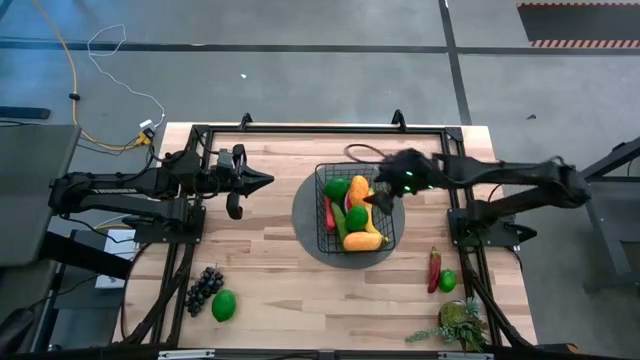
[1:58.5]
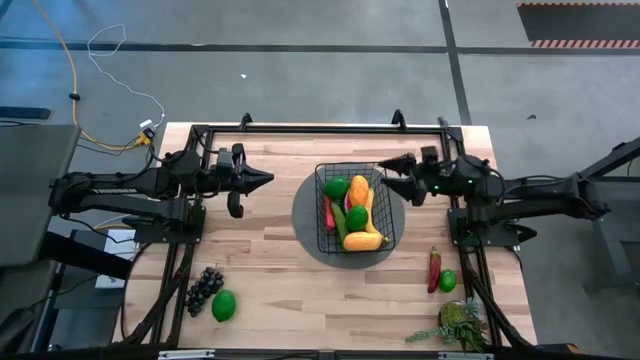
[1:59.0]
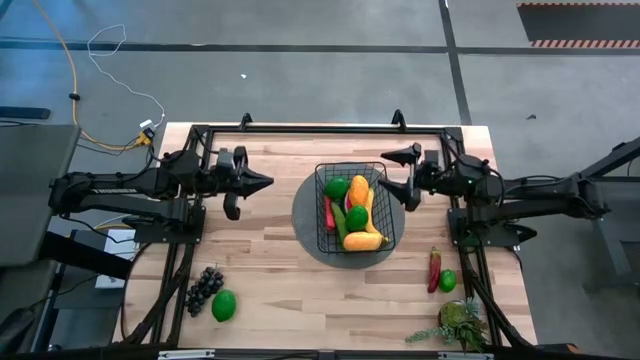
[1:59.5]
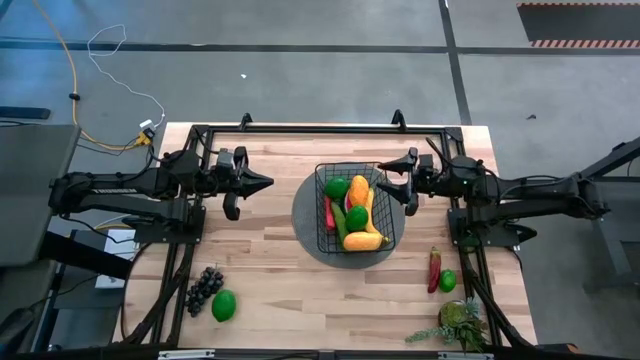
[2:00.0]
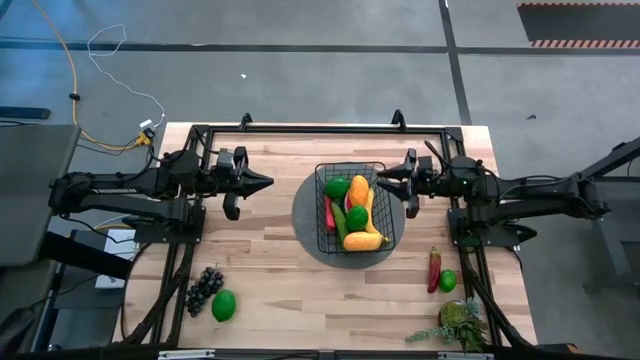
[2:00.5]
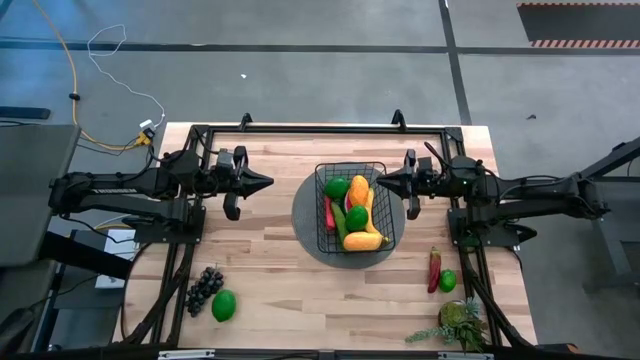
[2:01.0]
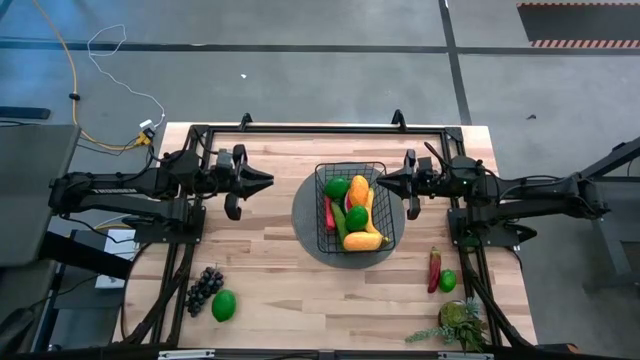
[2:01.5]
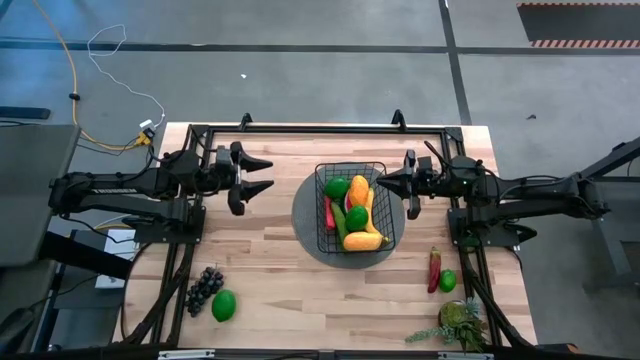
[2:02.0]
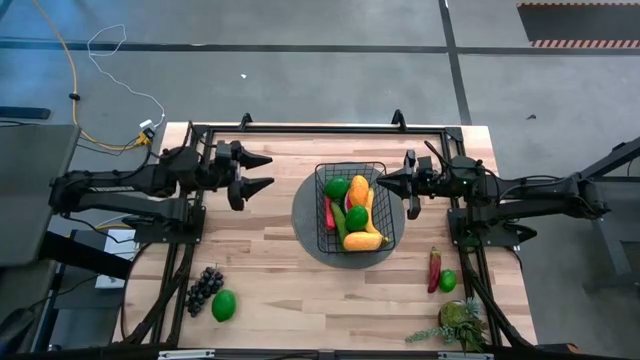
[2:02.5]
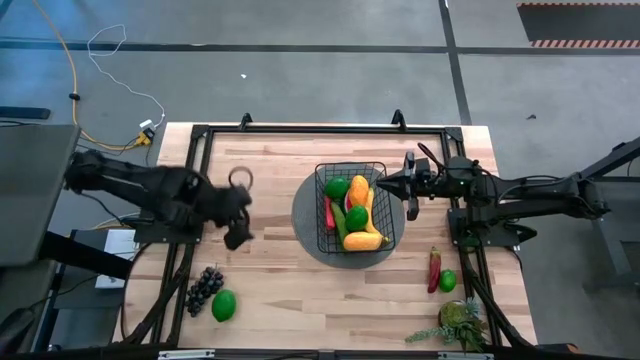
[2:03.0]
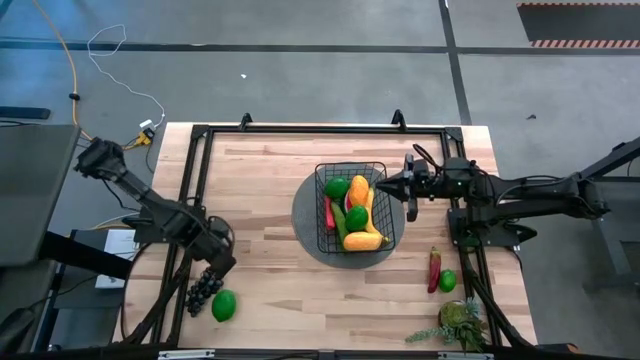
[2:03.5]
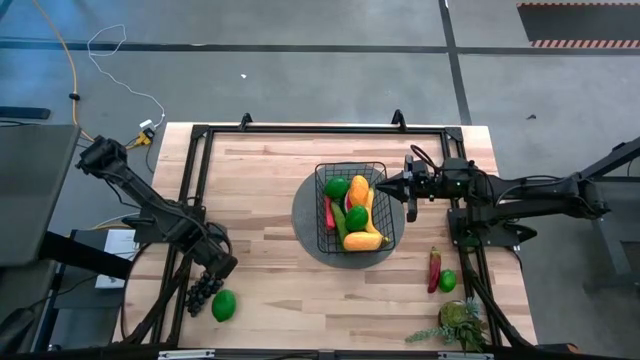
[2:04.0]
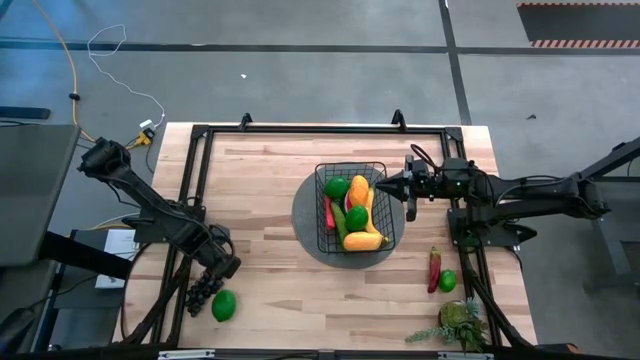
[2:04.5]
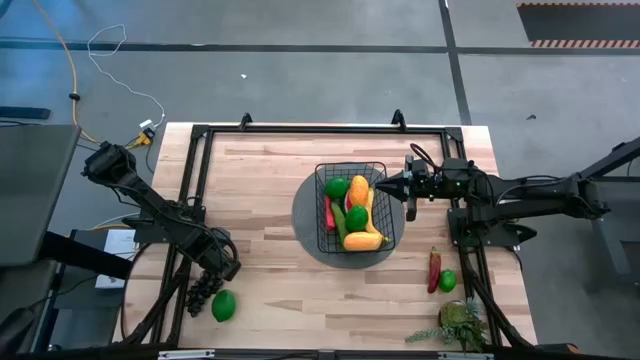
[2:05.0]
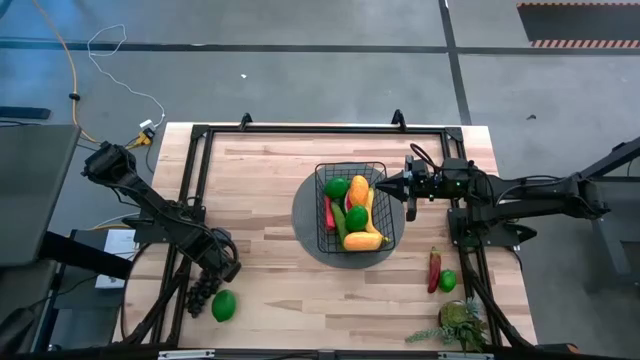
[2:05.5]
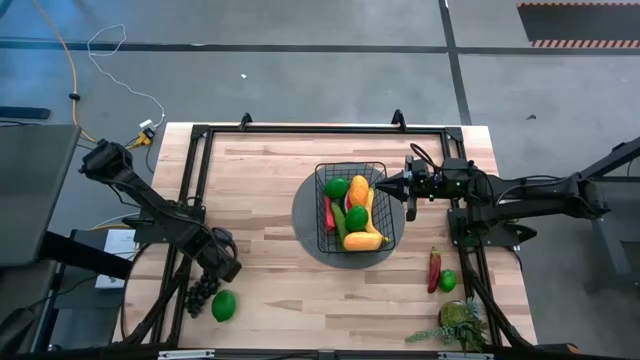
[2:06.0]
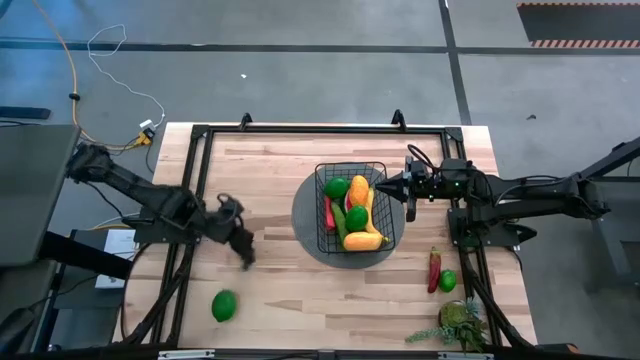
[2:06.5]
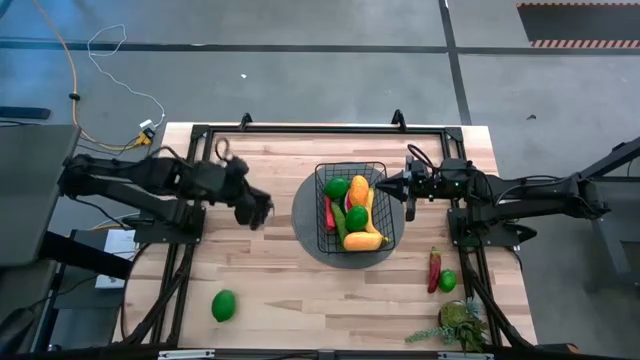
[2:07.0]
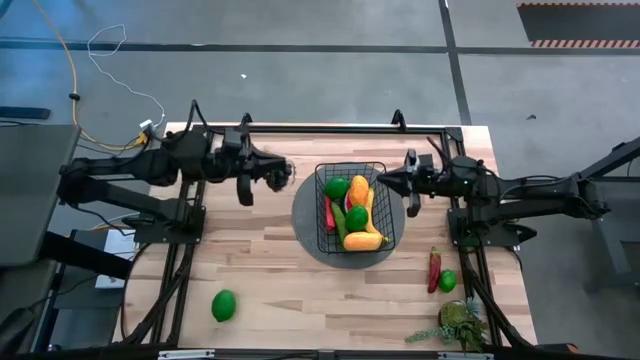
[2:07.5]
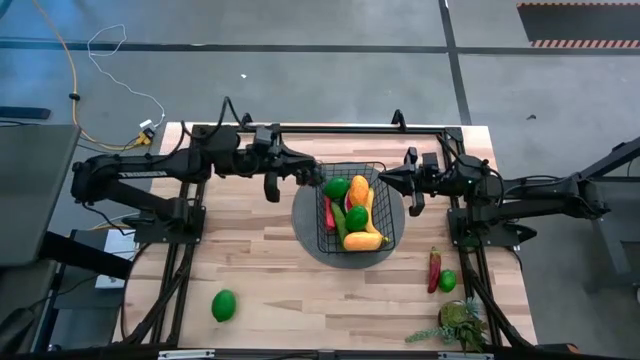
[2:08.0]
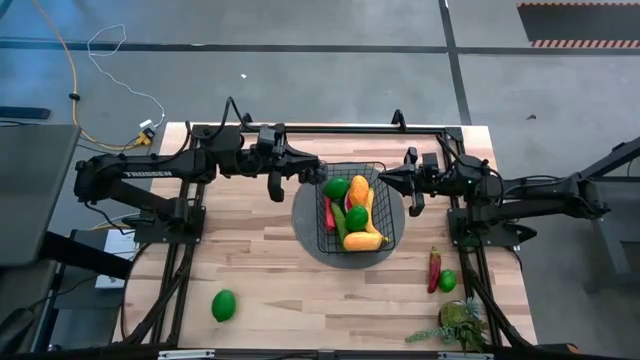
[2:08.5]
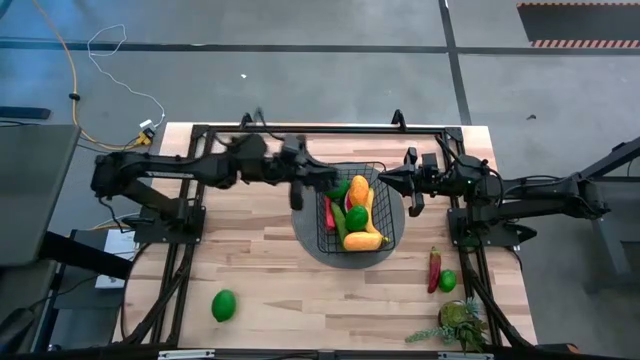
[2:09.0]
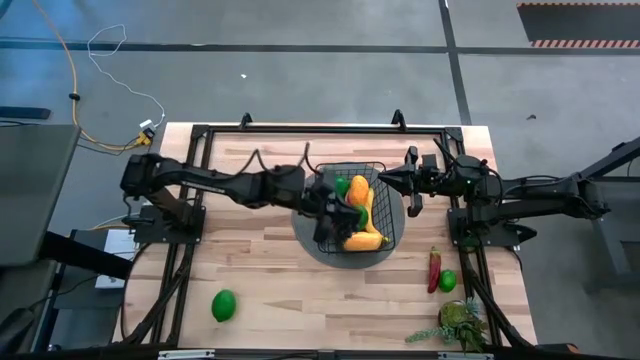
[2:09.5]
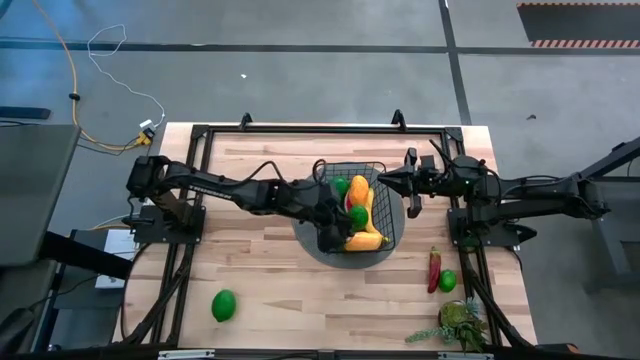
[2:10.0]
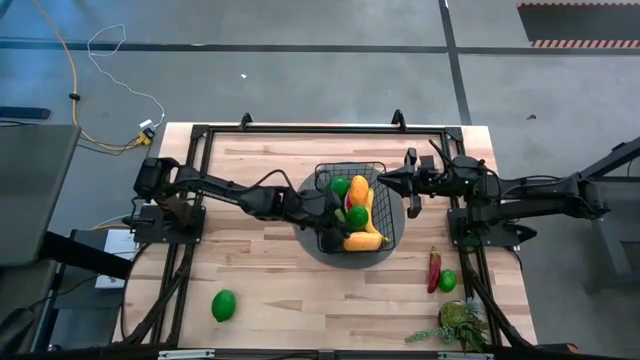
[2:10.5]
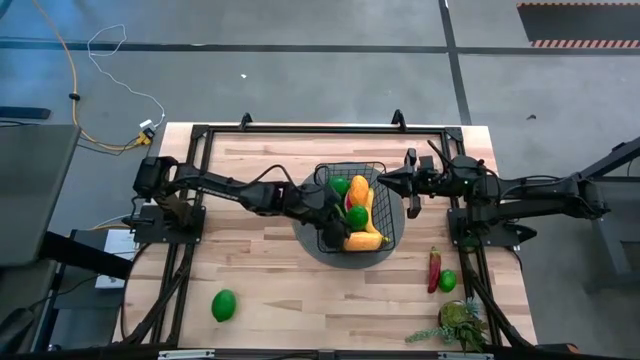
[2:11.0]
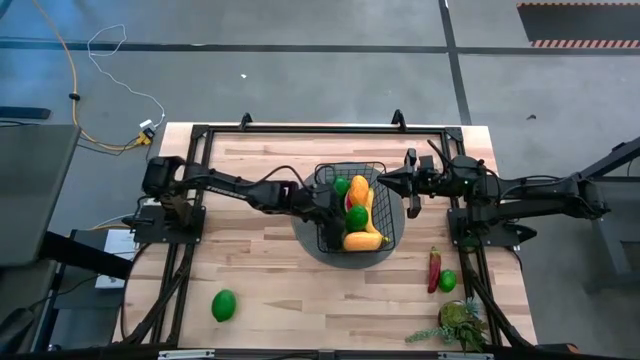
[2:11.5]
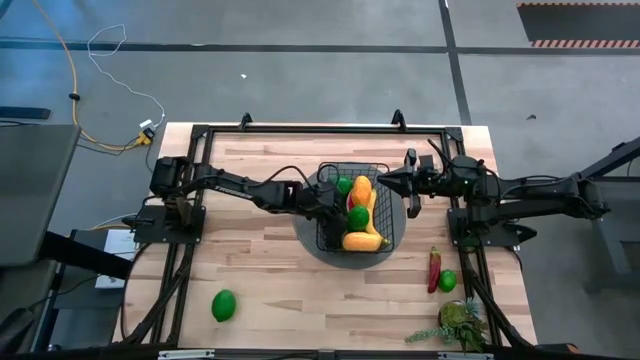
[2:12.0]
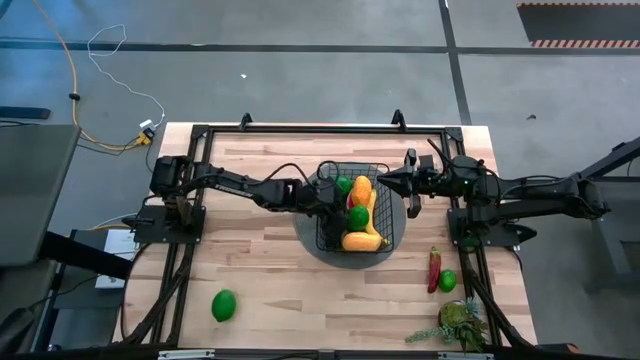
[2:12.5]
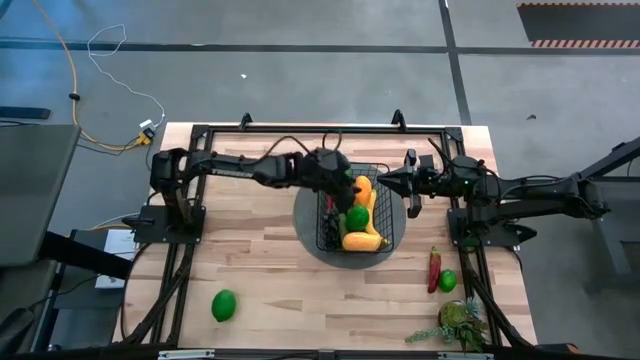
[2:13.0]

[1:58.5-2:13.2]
Task: Build produce basket
Put the black grapes into the black wire basket

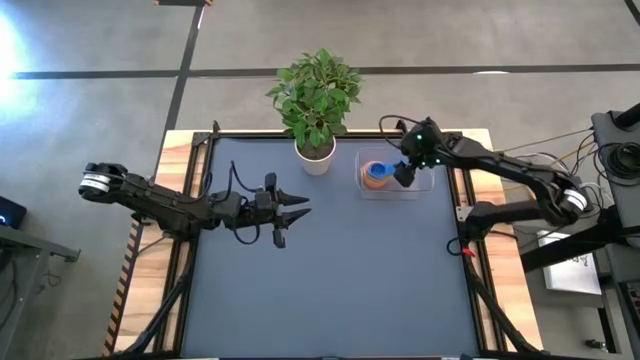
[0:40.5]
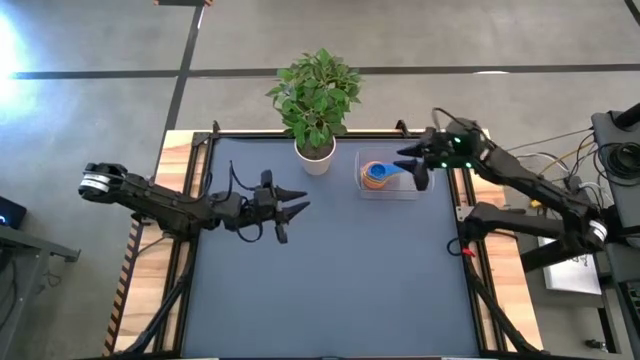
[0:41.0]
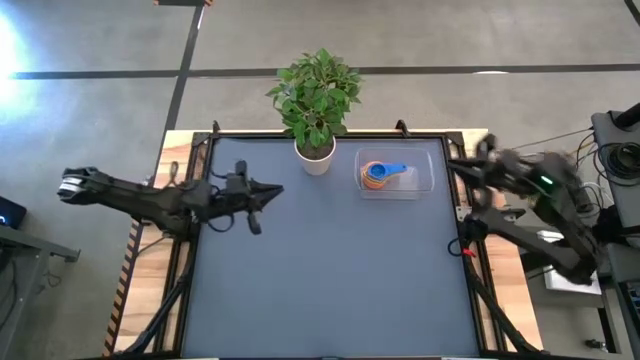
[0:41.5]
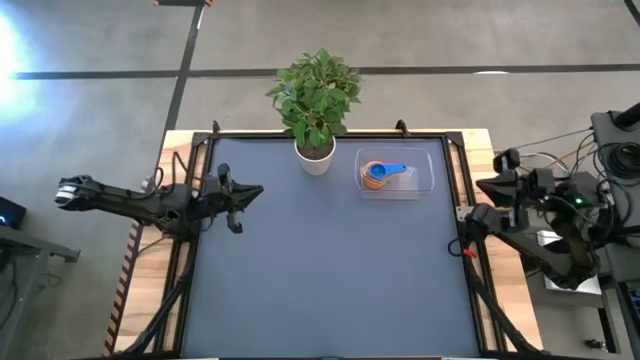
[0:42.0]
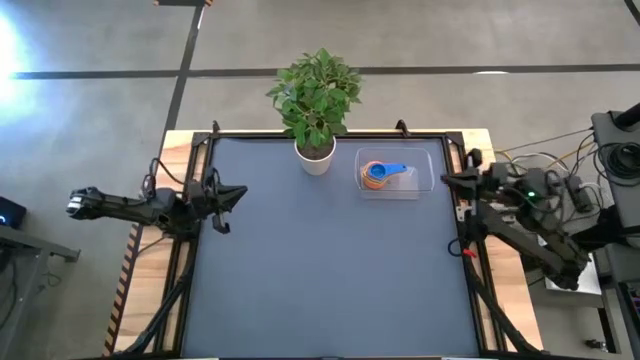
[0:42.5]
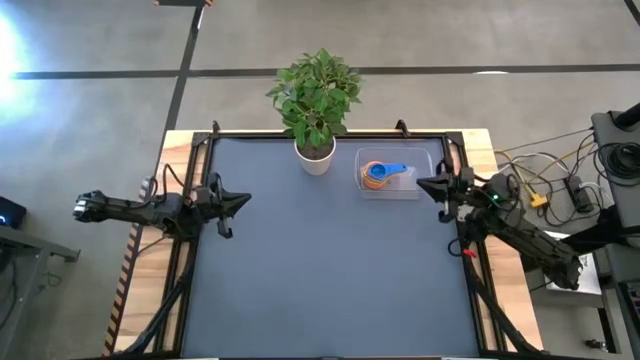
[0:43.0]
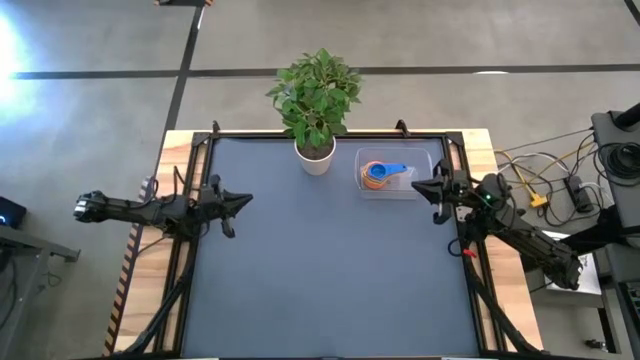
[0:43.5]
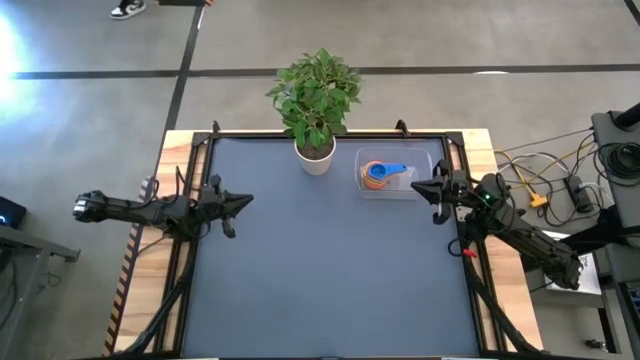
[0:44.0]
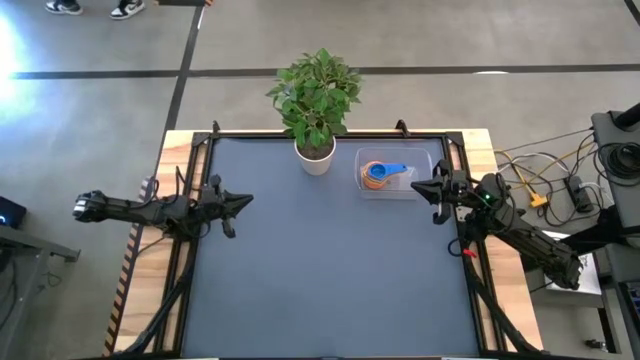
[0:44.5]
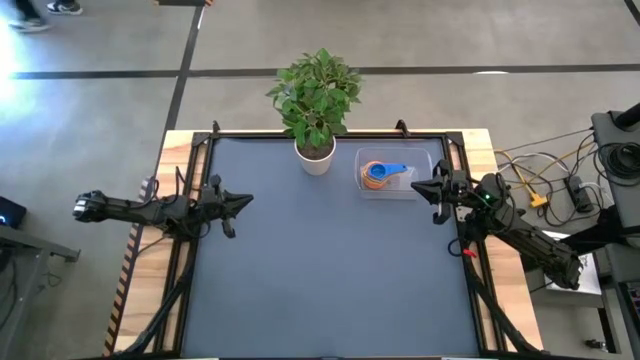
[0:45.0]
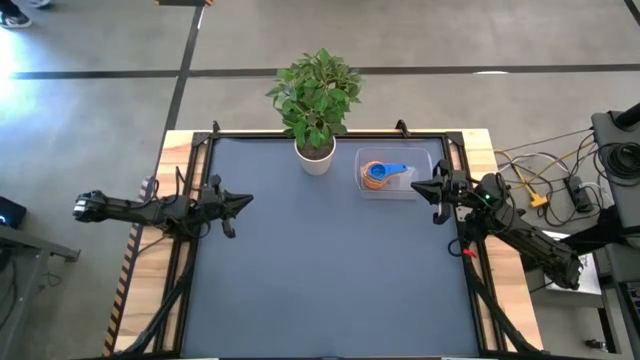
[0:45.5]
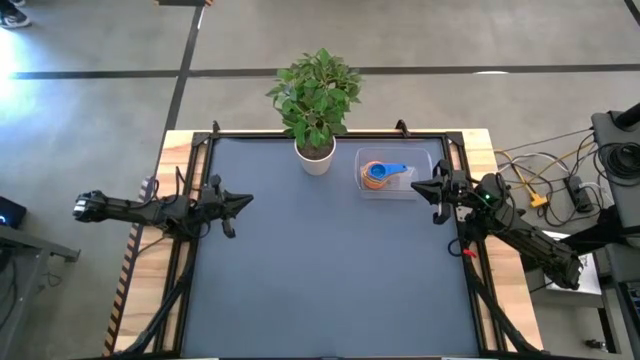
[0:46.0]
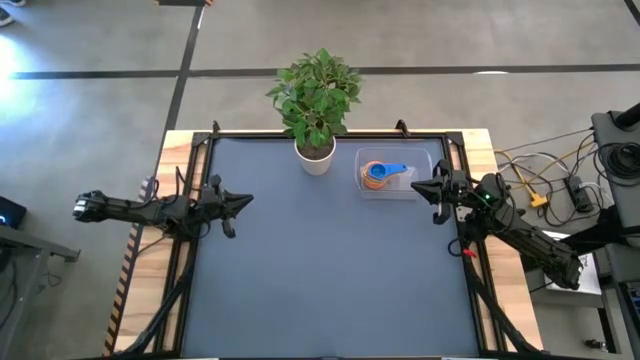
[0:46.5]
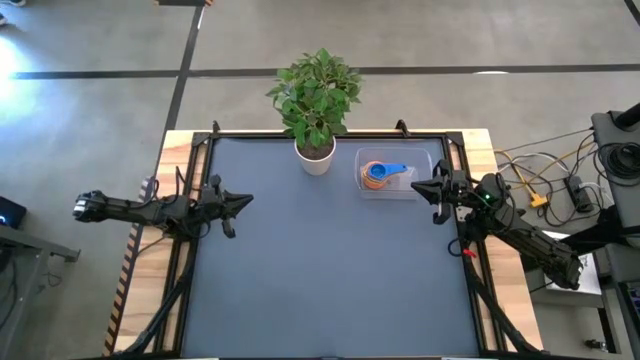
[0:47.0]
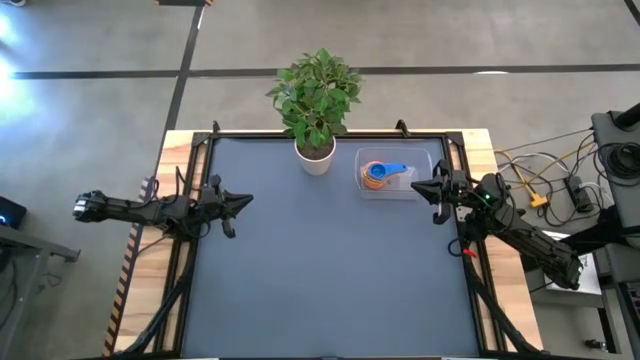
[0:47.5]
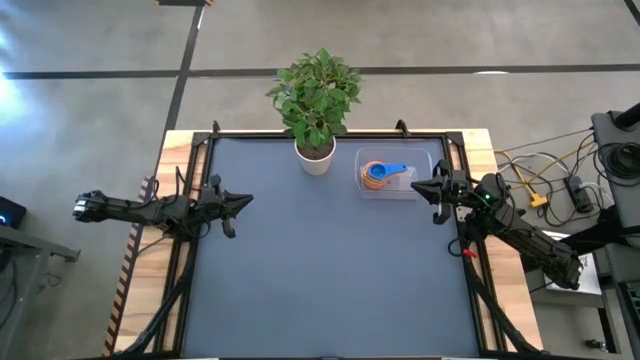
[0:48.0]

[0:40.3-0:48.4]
Task: Nest measuring cups in basket
Return to Home Position
